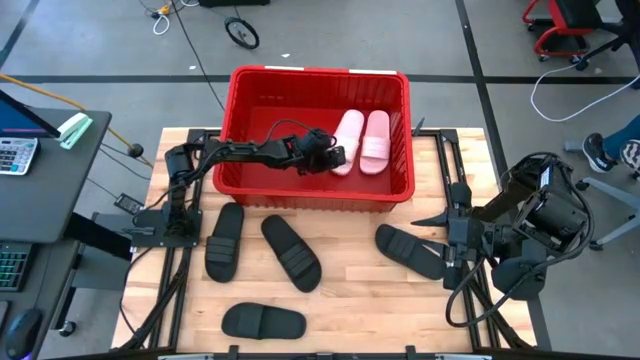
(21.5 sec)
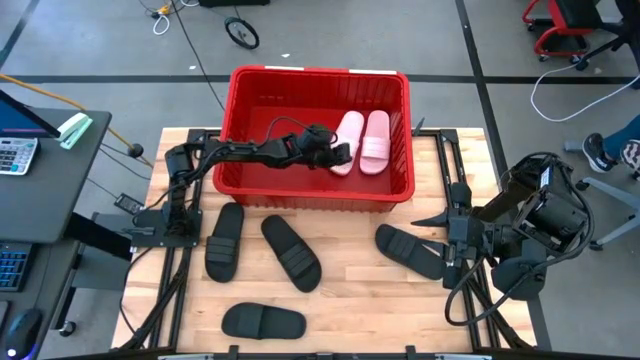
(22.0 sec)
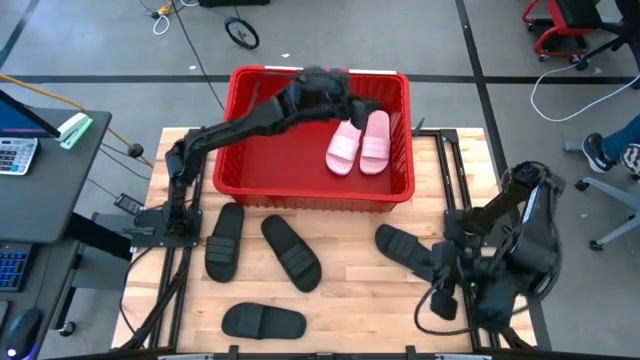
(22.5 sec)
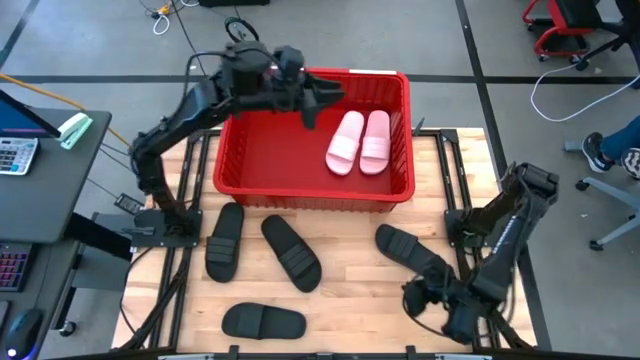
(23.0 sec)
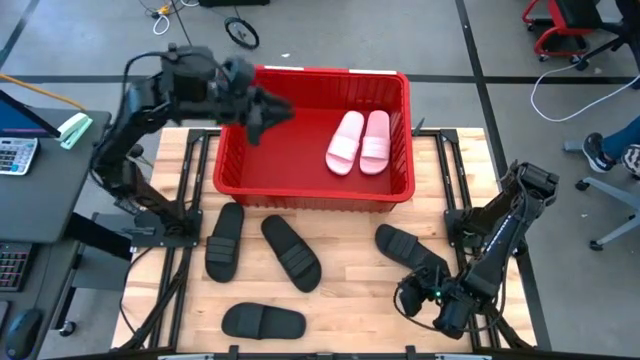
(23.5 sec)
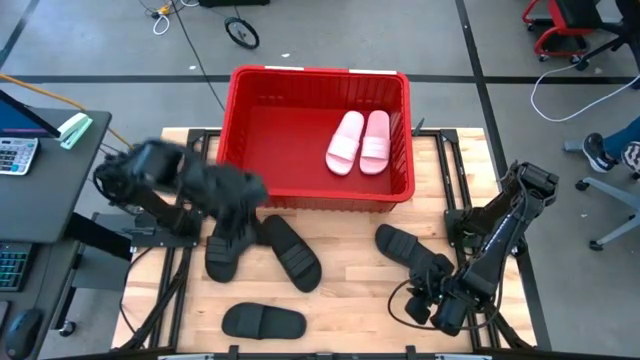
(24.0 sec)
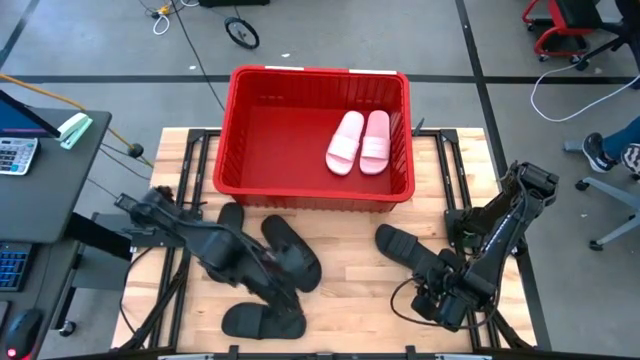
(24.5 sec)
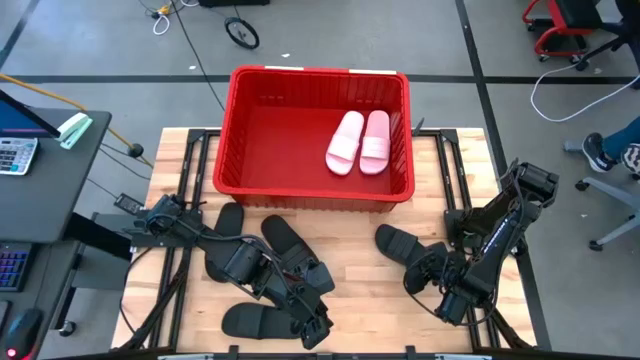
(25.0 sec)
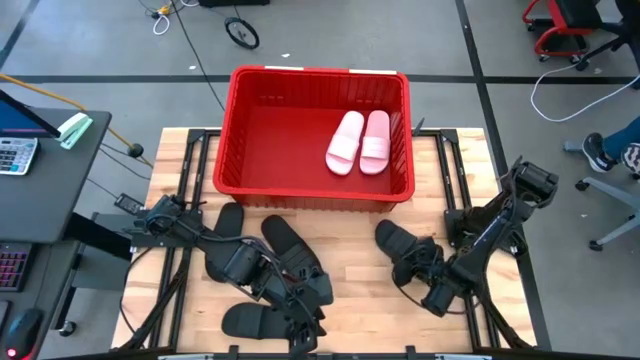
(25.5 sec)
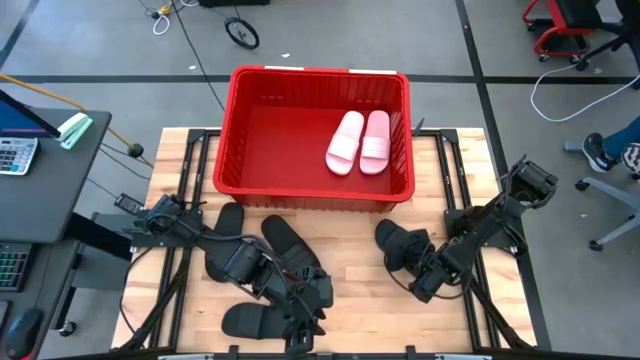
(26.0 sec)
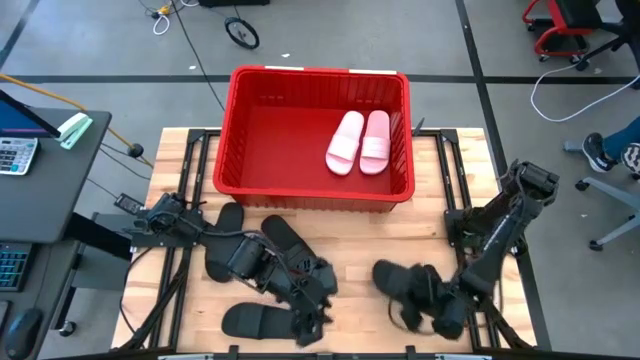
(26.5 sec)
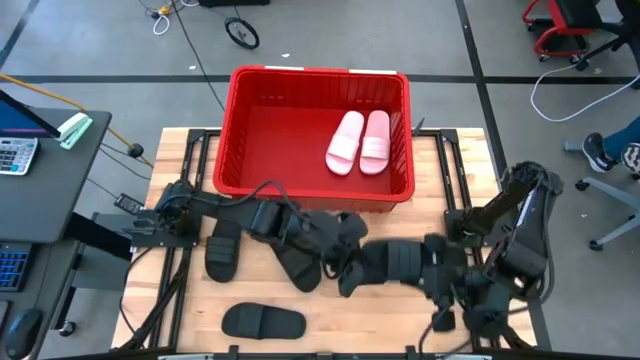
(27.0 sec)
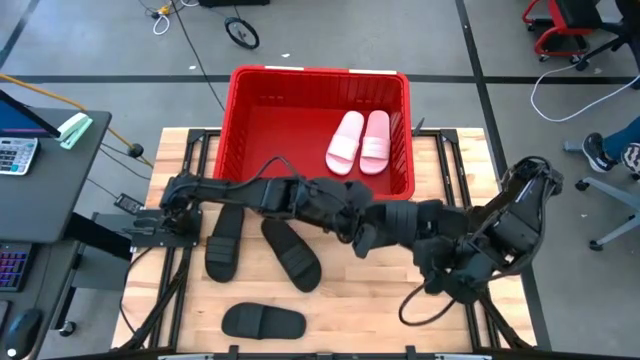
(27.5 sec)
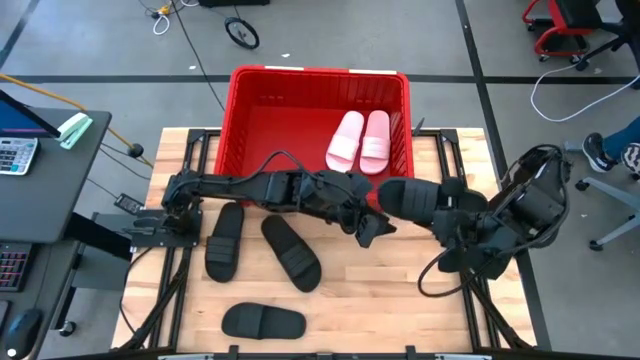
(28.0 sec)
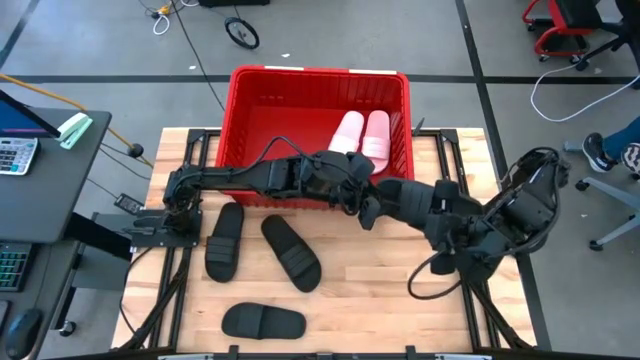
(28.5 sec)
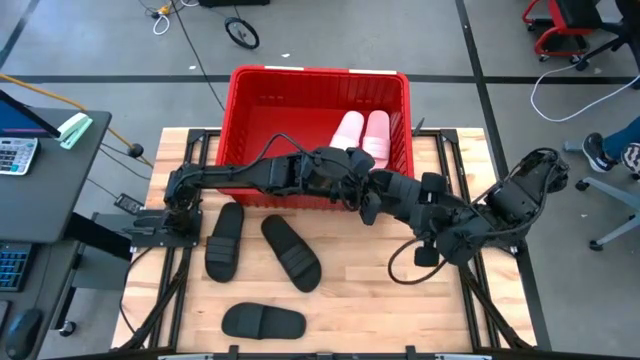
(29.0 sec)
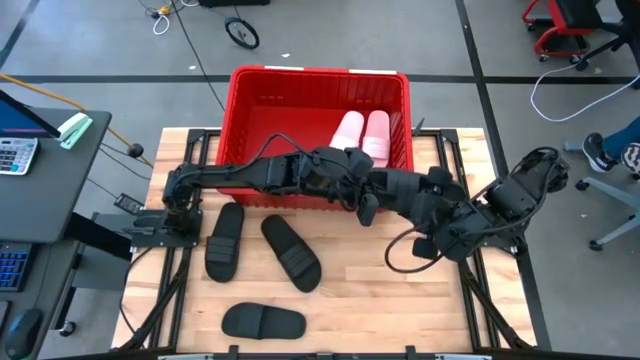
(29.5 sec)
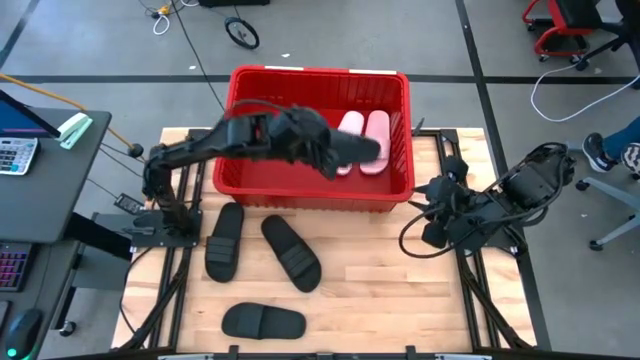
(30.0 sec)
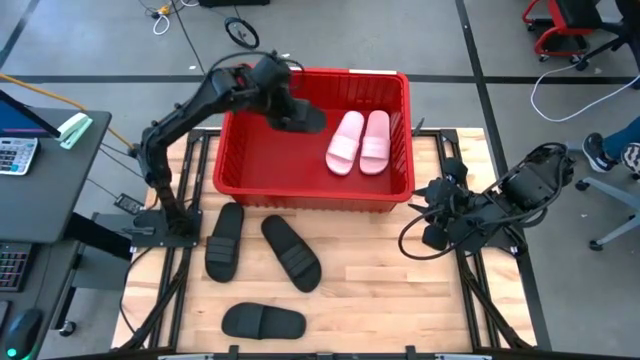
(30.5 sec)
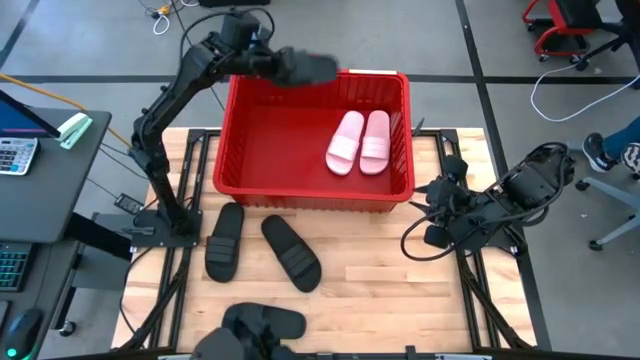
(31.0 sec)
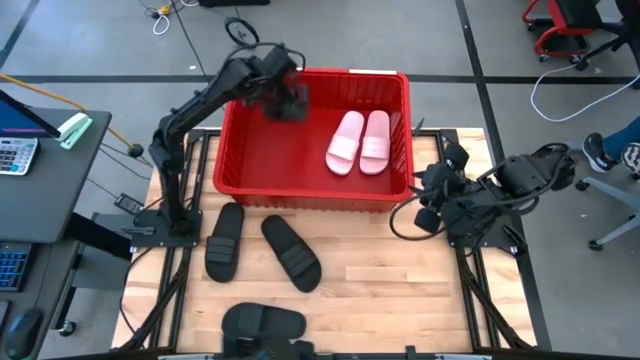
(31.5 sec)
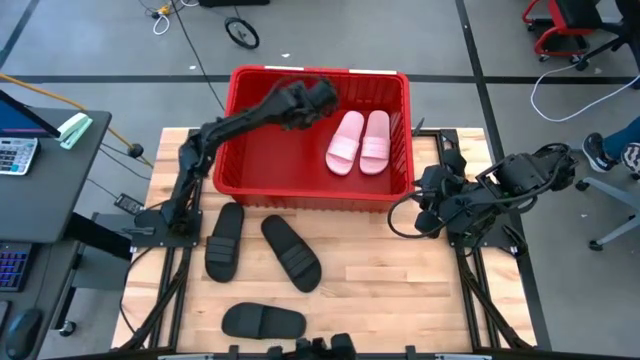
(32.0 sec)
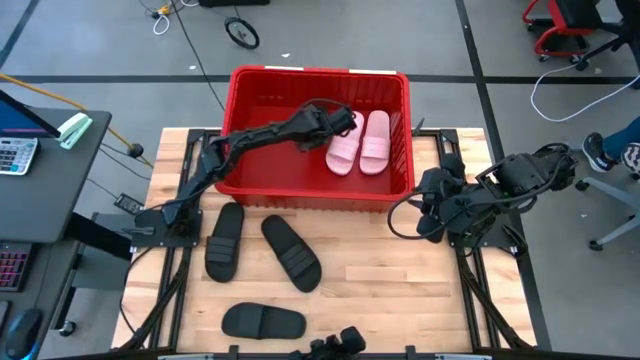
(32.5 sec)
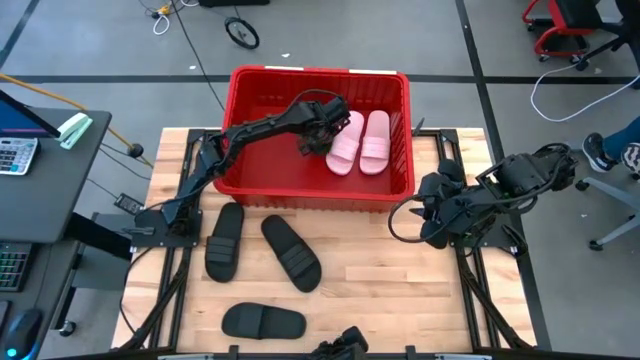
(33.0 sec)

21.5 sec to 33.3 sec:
Task: Pick and place slides into bin
Put the black slide into the red bin

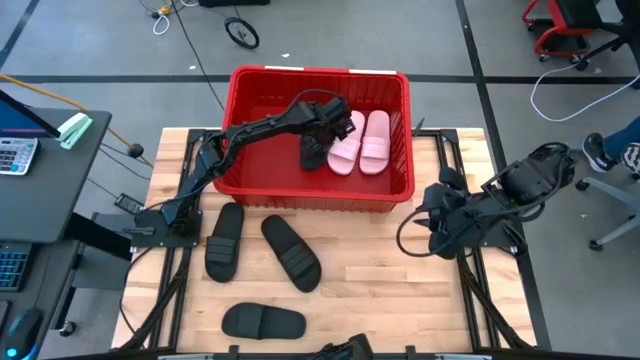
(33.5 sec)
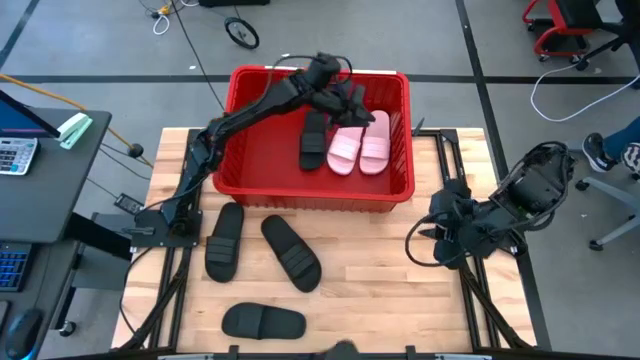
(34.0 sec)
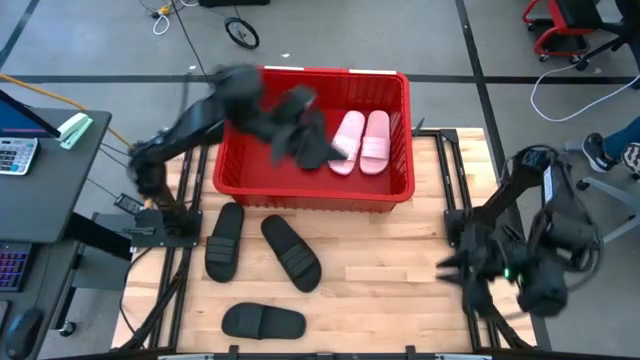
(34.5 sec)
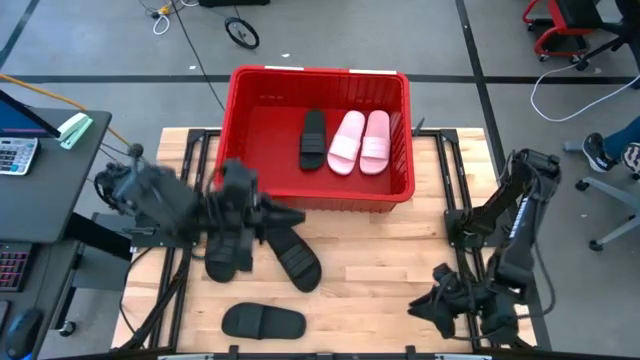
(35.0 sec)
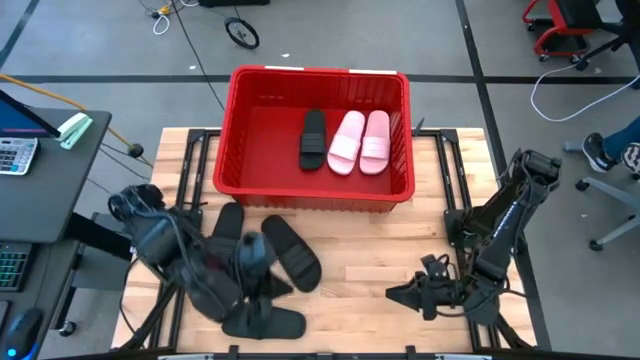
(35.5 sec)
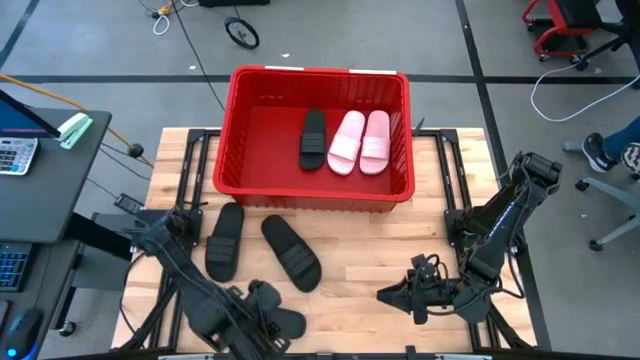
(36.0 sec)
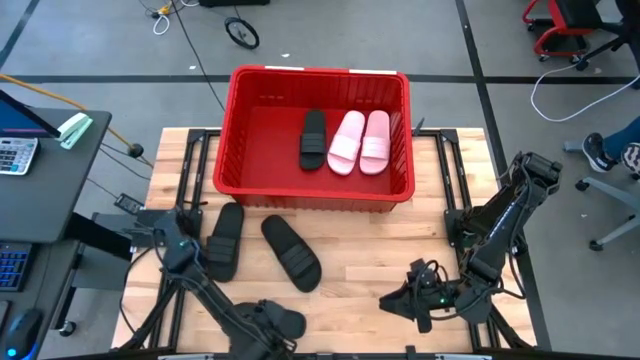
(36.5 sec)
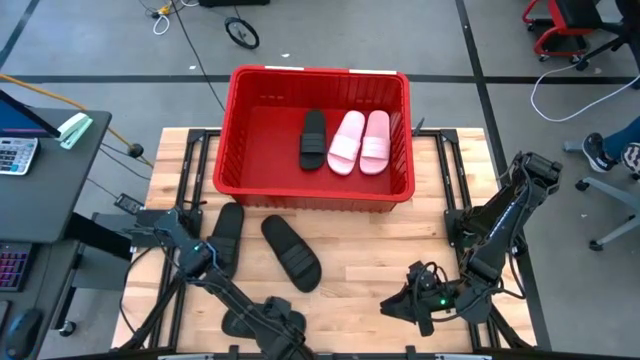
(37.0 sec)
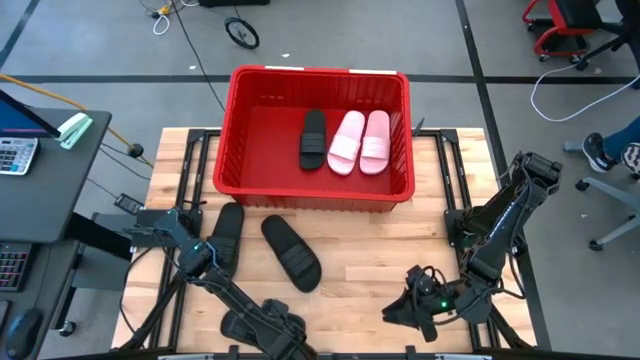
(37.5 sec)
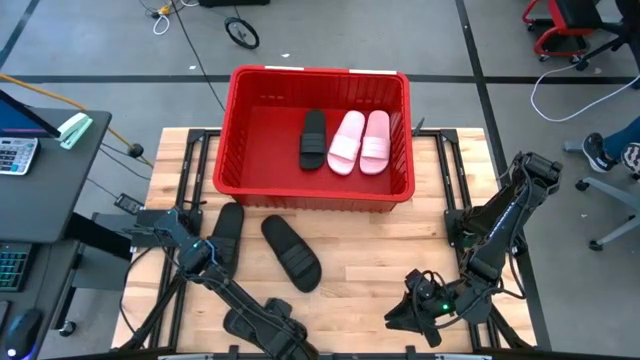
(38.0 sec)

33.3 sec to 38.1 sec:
Put the black slide into the red bin

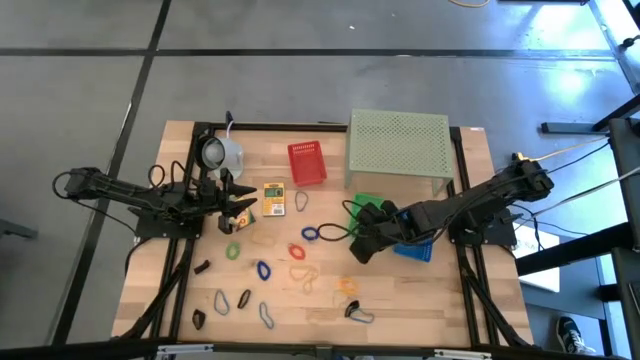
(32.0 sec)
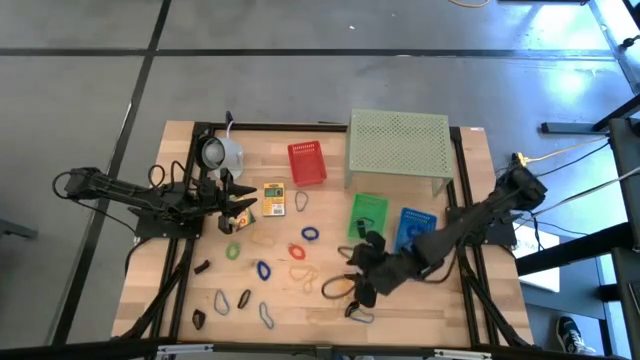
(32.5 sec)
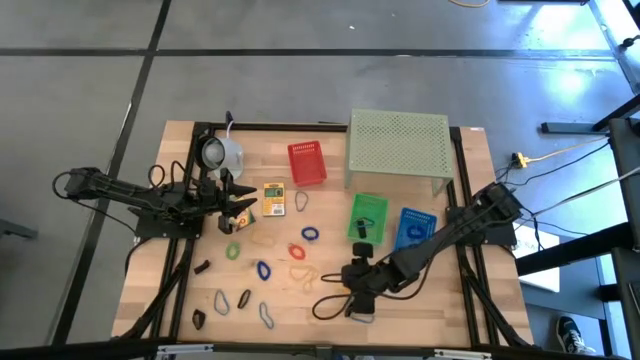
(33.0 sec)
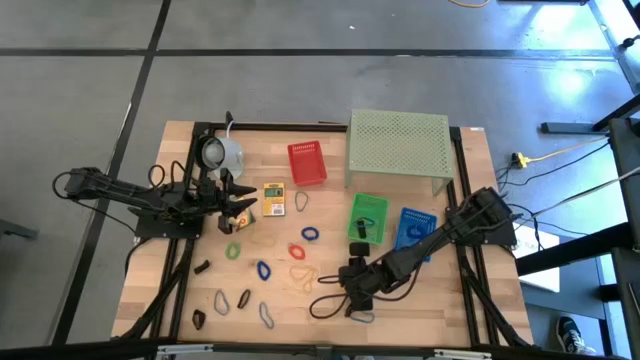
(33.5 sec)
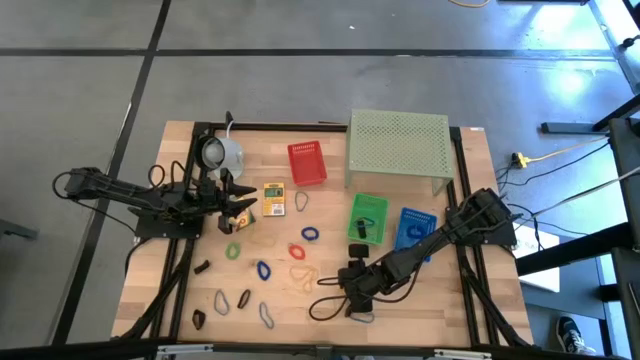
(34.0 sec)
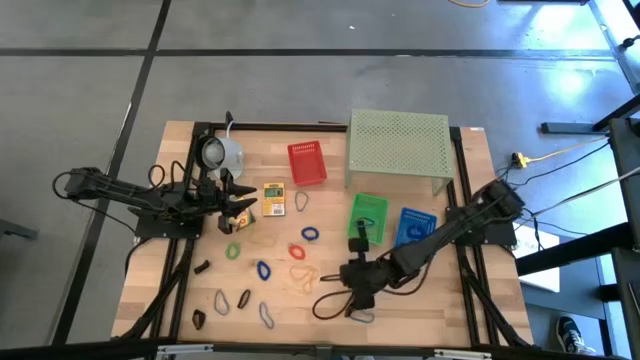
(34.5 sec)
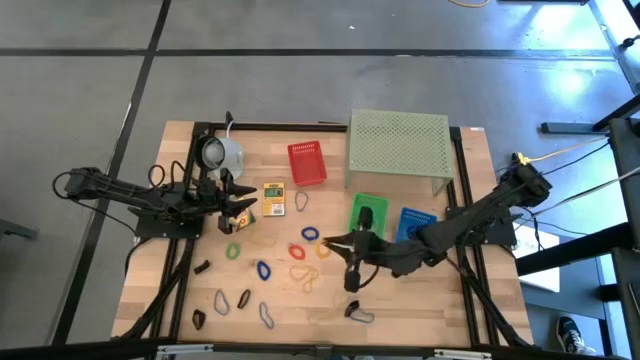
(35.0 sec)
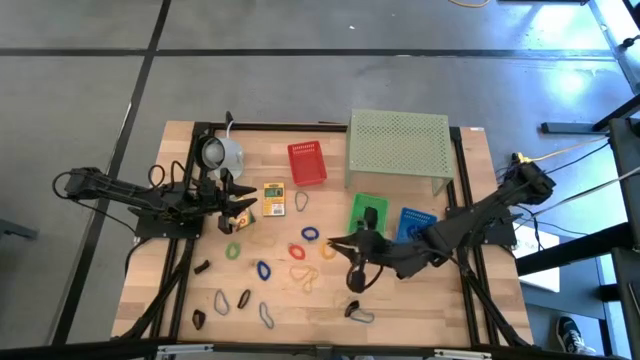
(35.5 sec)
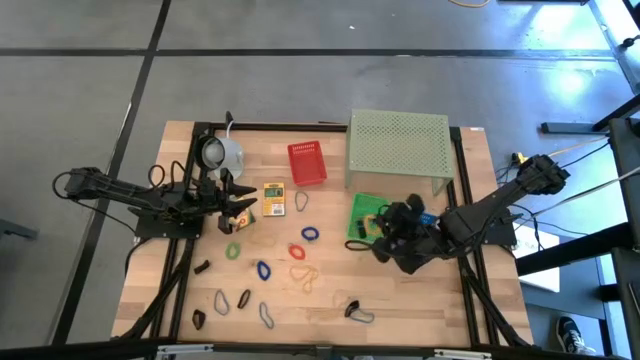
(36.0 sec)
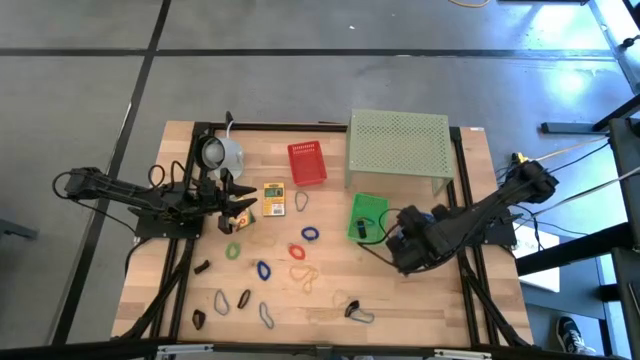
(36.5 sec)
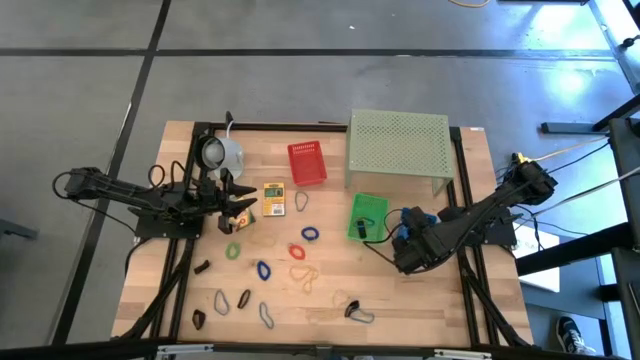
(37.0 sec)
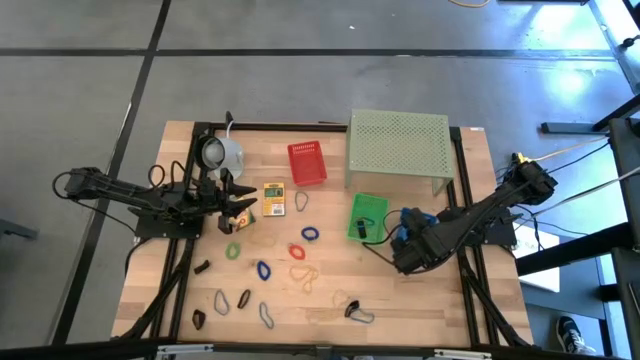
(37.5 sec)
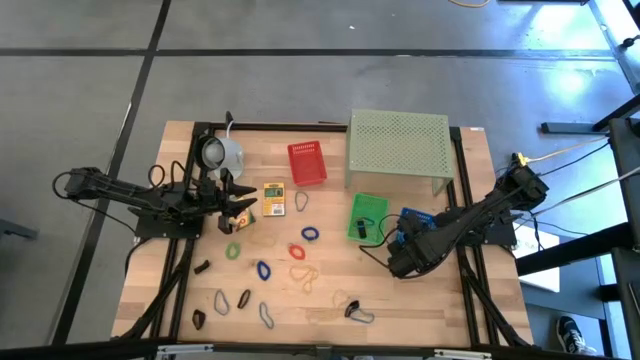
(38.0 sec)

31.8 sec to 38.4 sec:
Task: Pick & Place Office Desk Supplies
Put the yellow spring keychain into the blue bin
